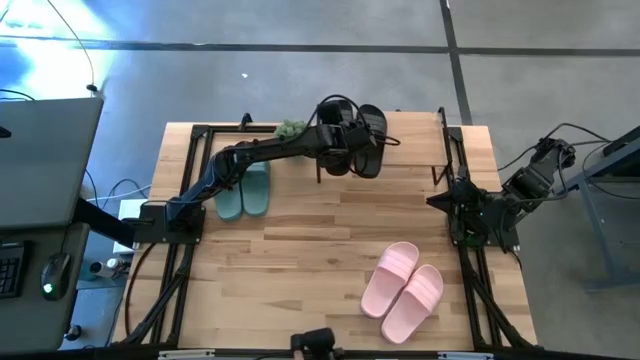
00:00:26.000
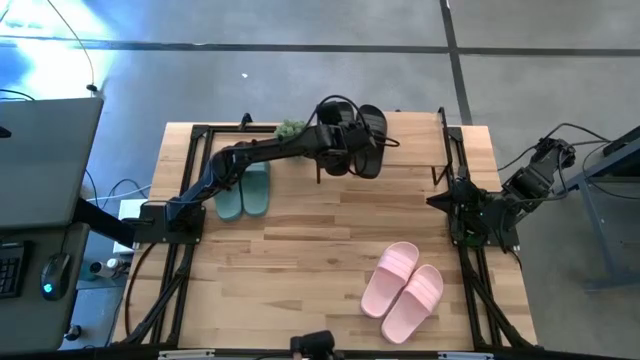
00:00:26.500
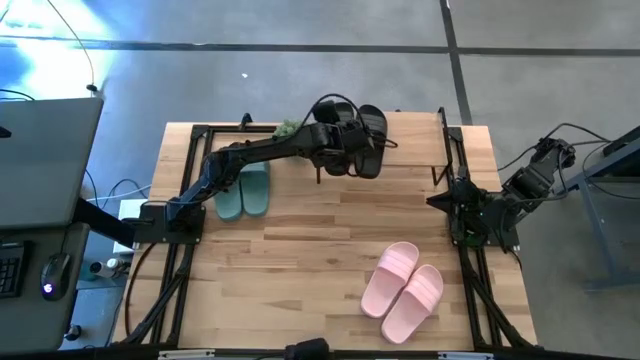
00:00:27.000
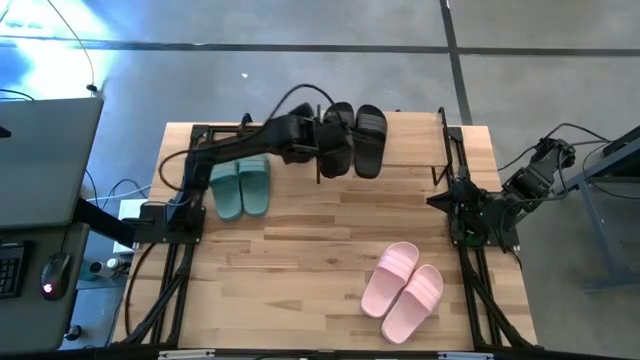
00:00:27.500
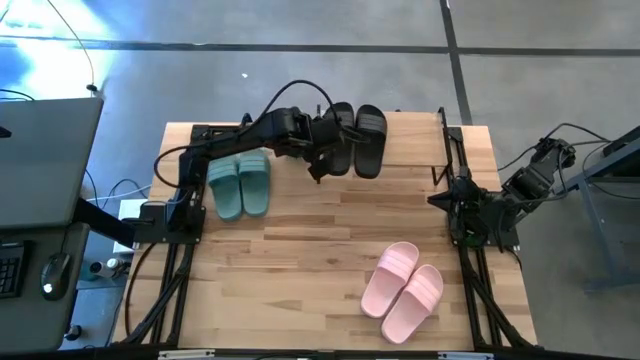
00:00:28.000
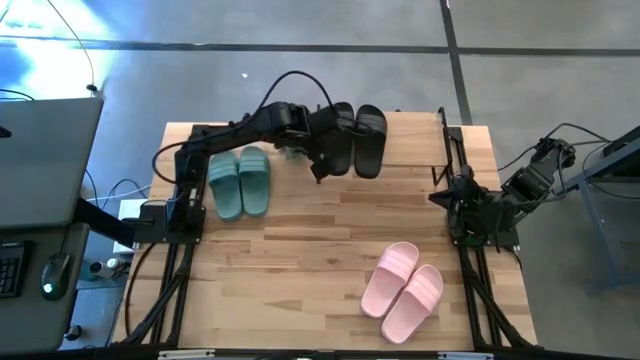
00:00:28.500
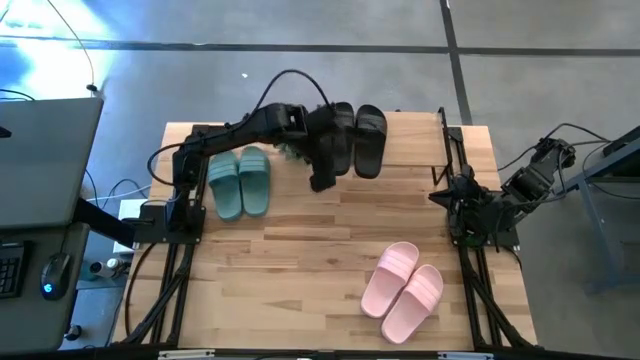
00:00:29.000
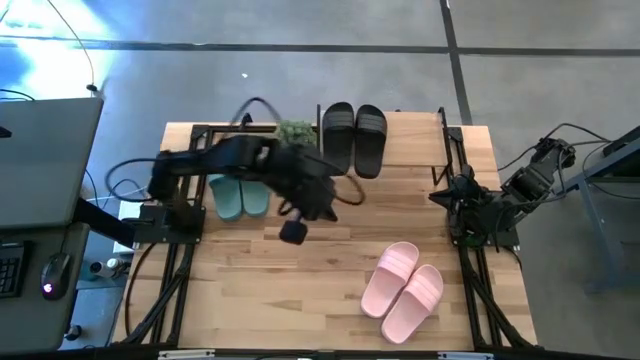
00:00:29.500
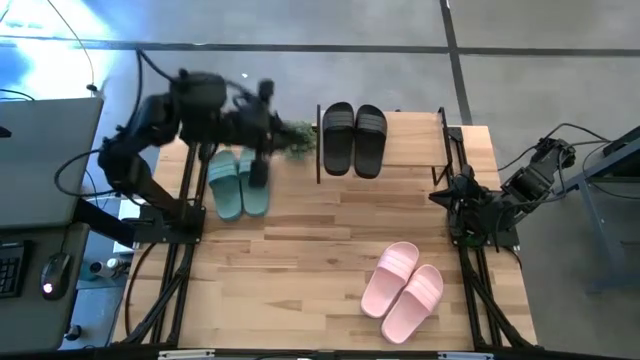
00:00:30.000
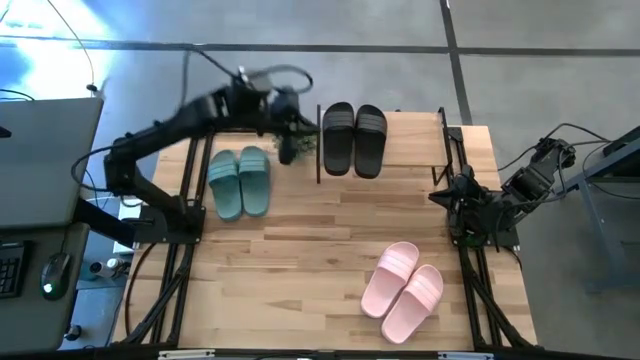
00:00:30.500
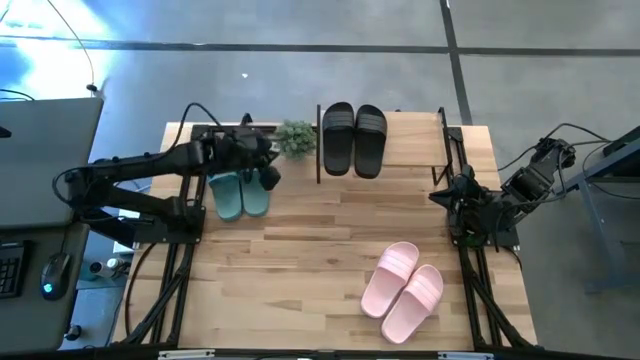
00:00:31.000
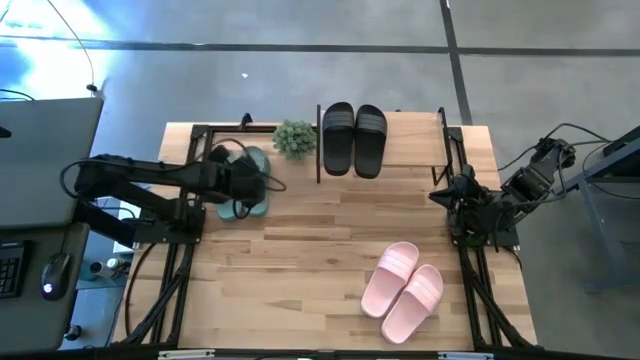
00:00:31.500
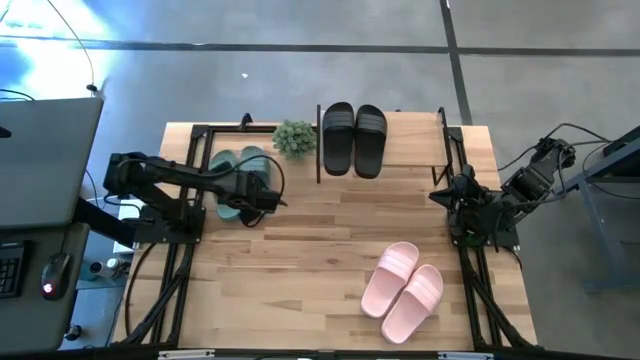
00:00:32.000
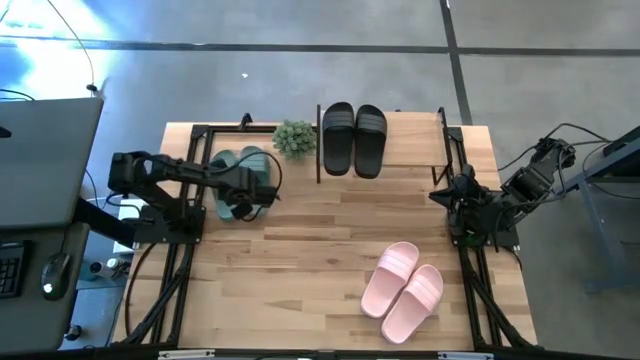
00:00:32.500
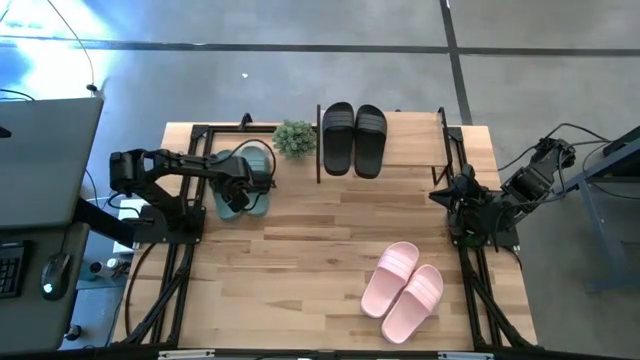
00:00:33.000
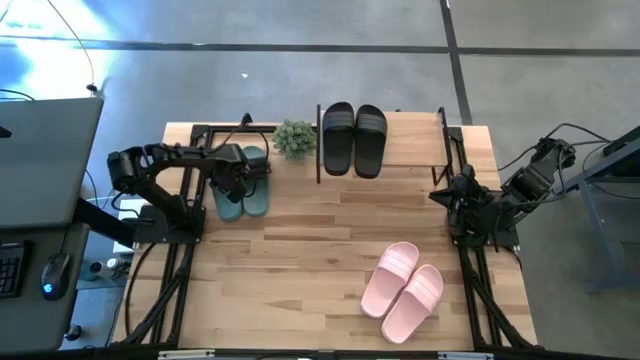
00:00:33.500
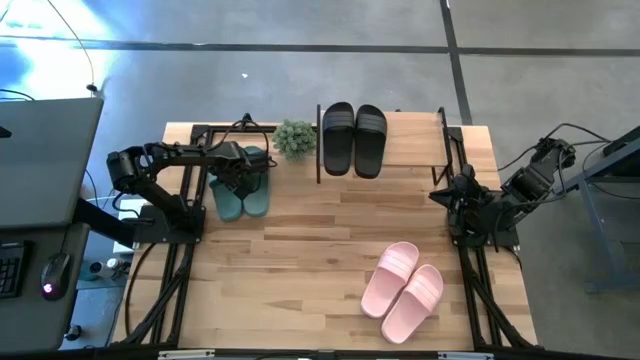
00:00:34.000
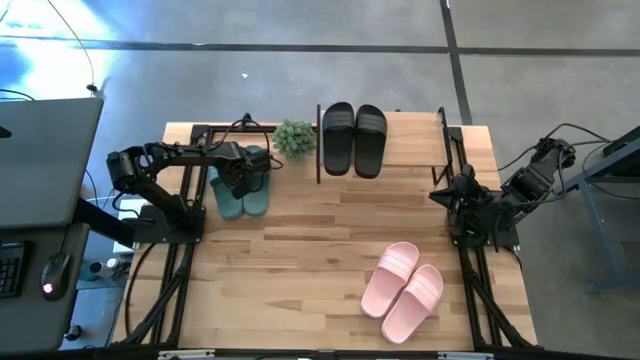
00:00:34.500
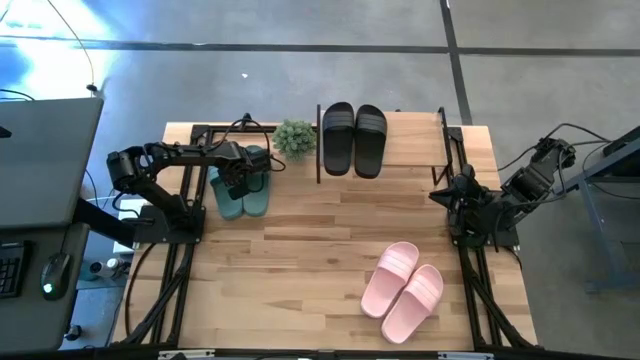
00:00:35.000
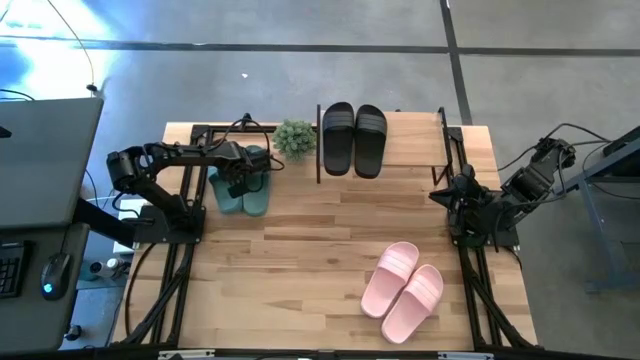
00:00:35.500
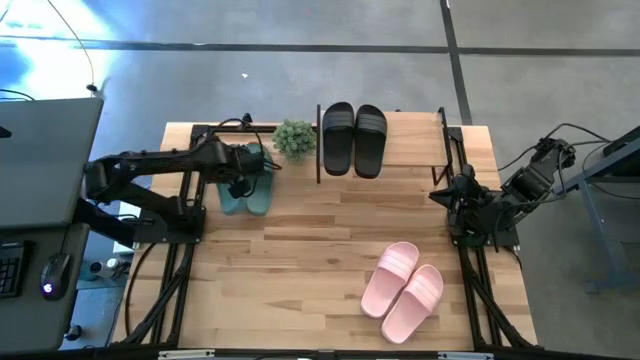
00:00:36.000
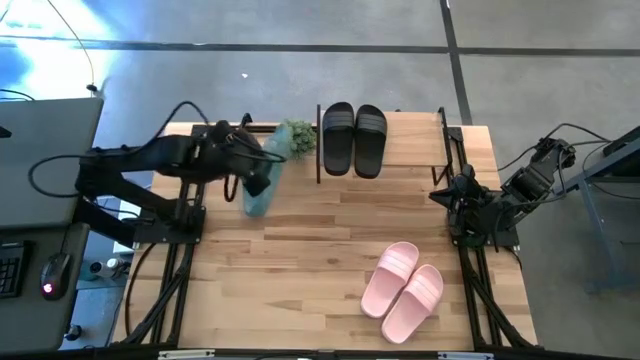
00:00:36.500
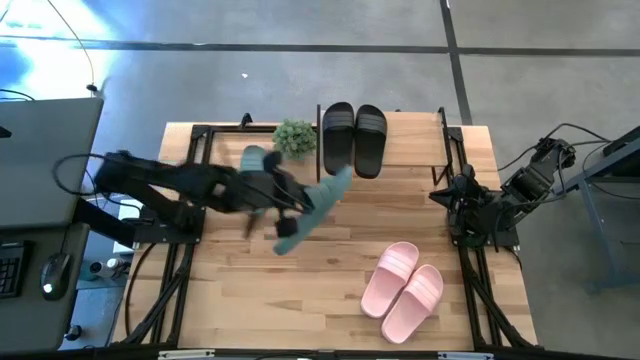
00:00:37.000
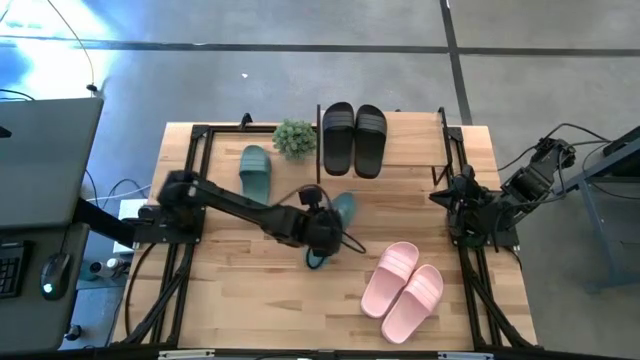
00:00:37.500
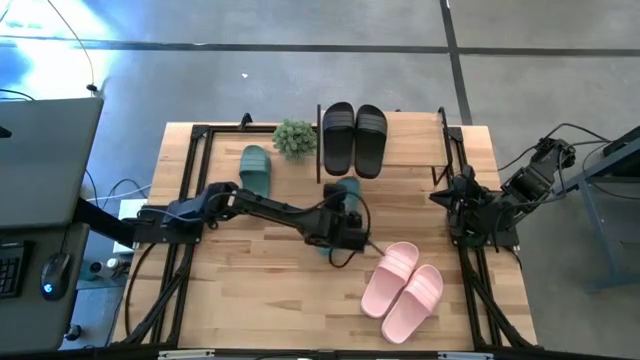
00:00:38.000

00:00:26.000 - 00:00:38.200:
Task: Pick and place slides into the shelf
Put the left green slide under the shelf

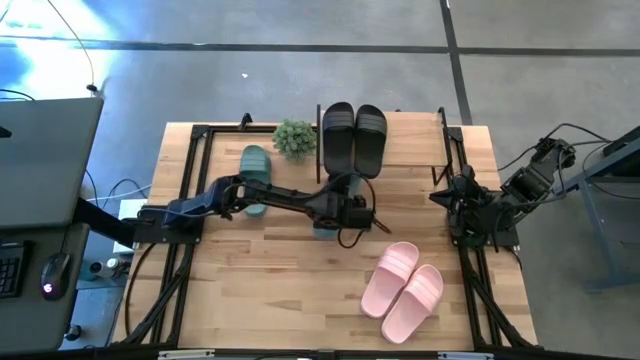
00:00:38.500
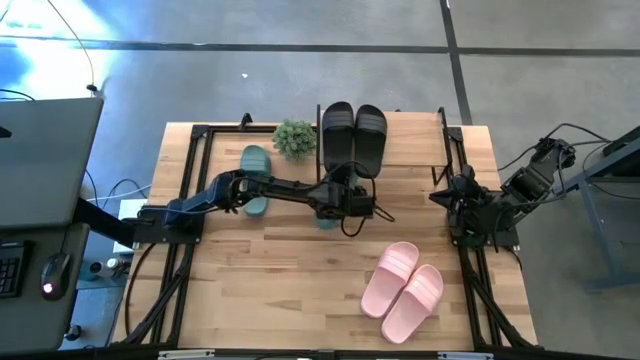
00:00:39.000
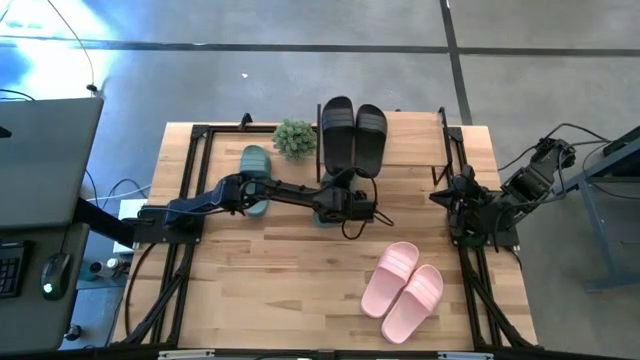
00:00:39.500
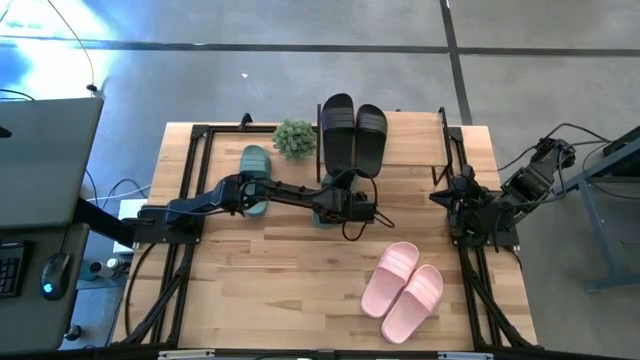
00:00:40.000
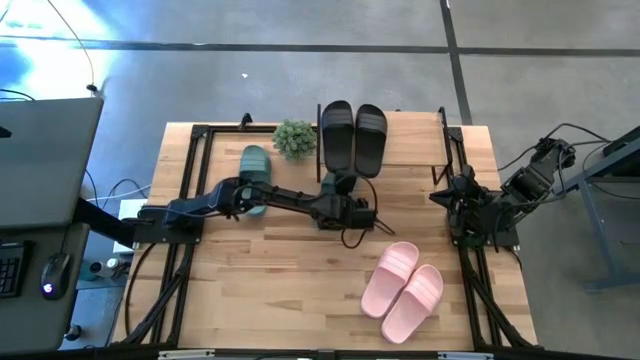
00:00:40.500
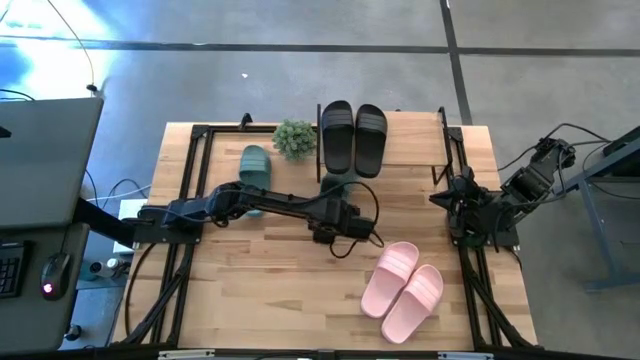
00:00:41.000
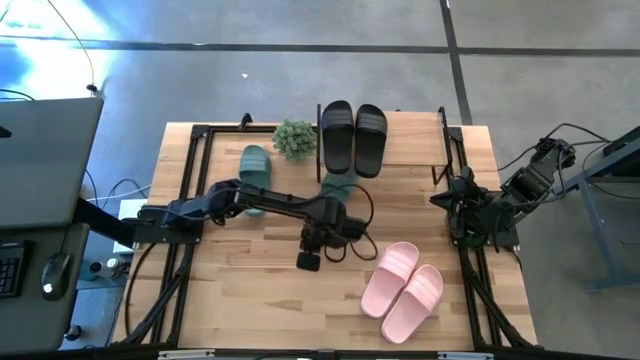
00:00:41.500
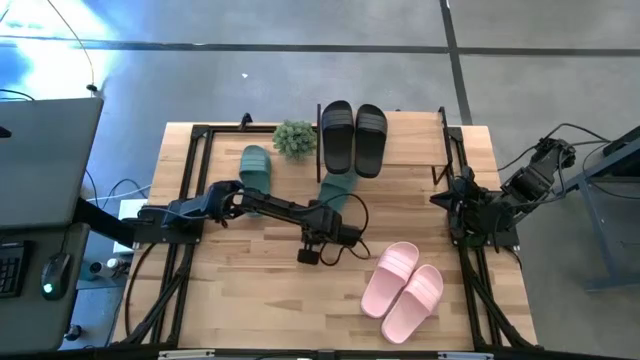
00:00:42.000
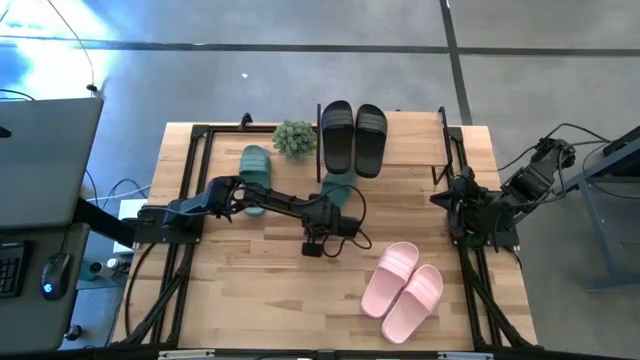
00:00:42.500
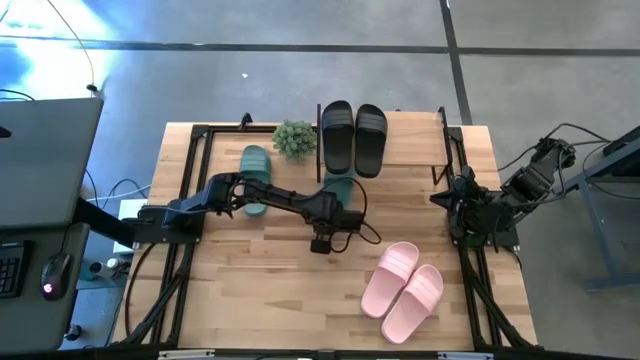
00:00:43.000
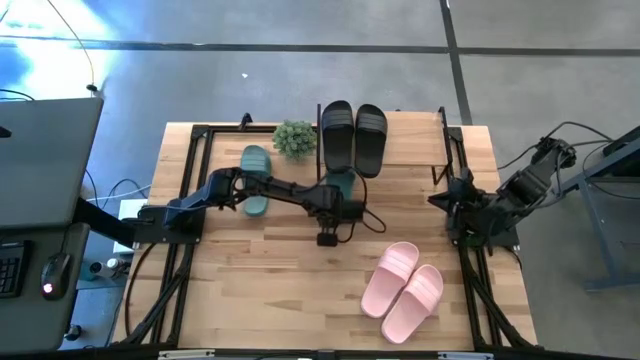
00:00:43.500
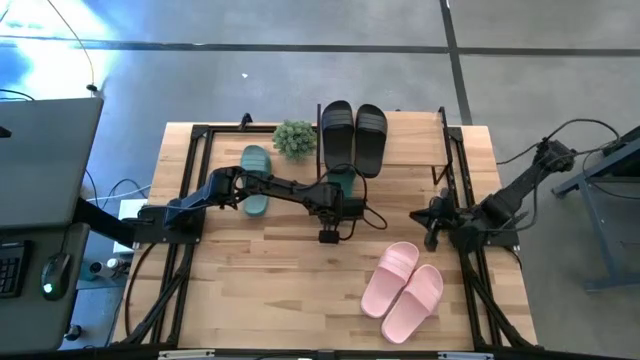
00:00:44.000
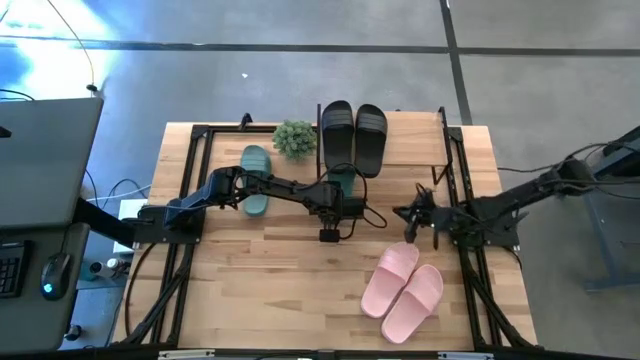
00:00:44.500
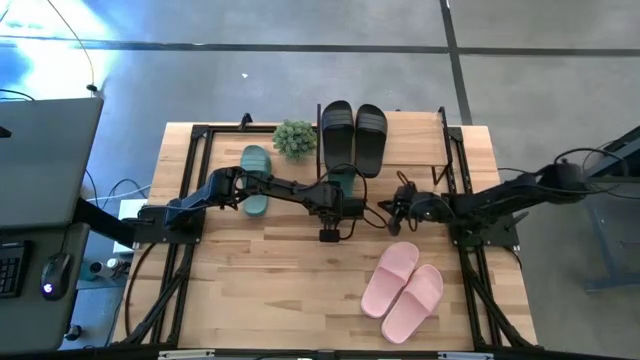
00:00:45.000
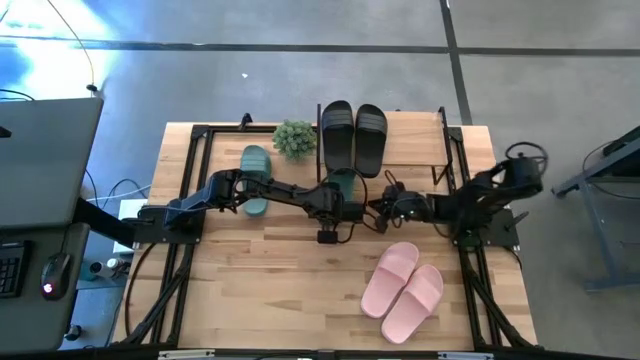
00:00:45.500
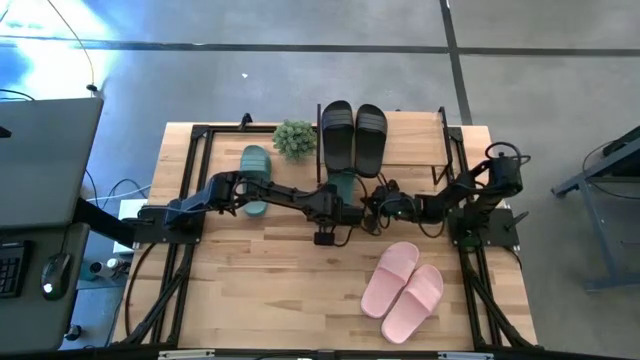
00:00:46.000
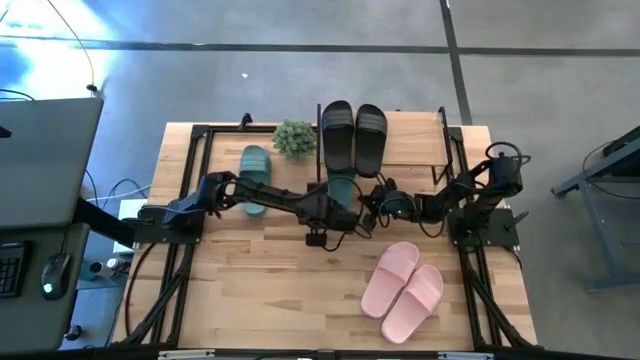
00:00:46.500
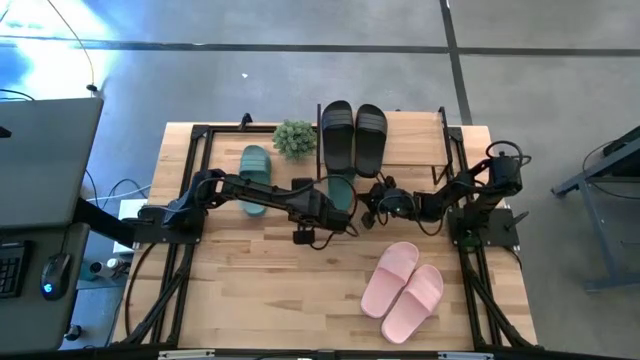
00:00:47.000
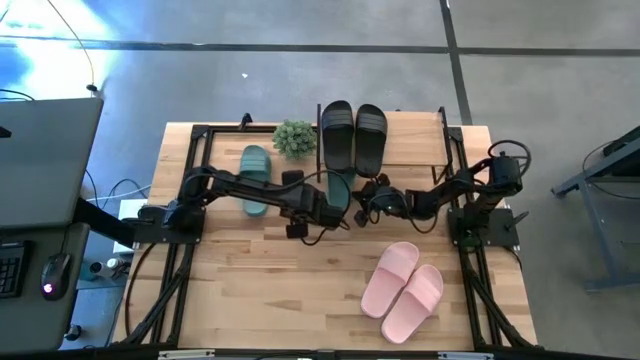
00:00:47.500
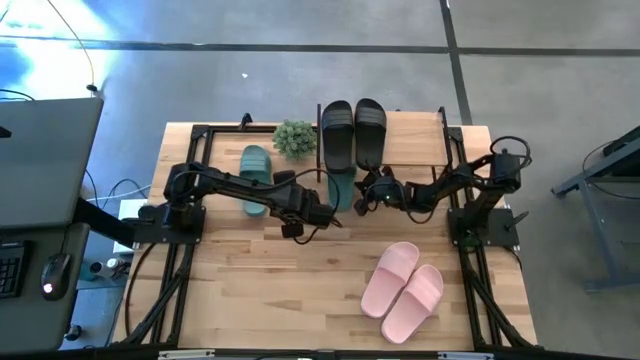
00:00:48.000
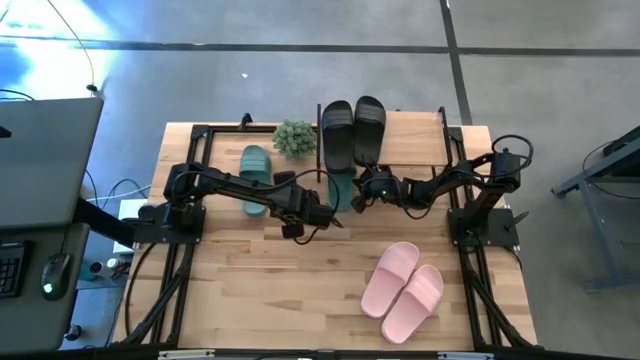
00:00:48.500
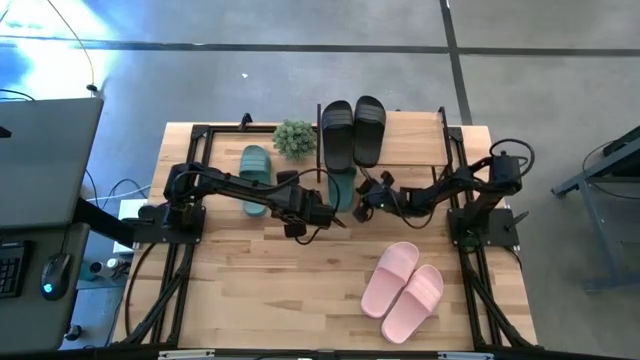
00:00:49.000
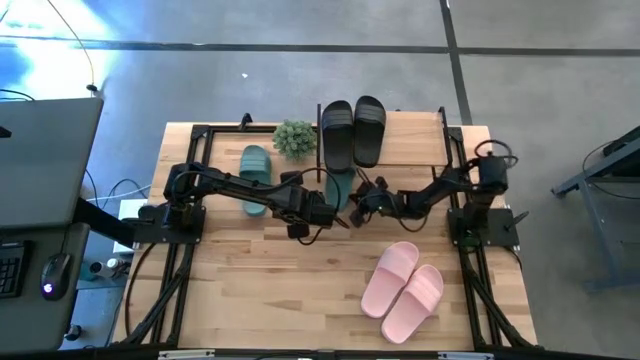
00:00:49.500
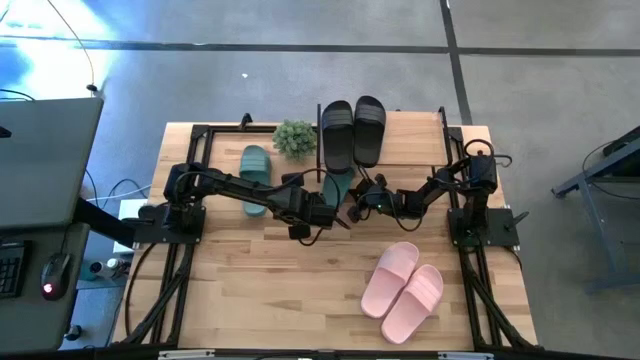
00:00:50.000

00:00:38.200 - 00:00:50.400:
Put the left green slide under the shelf
